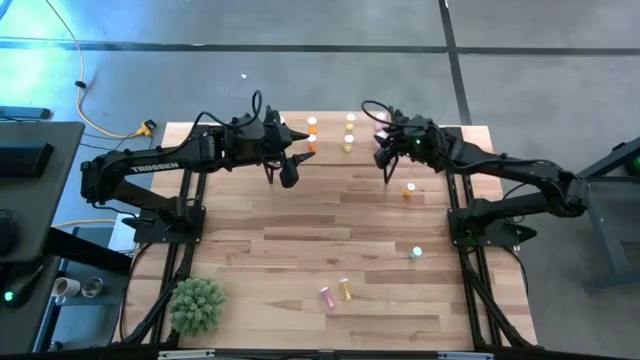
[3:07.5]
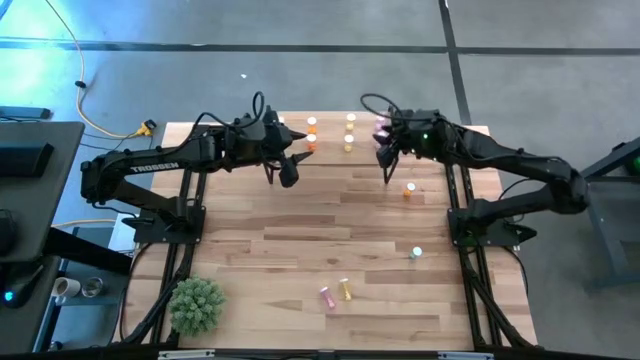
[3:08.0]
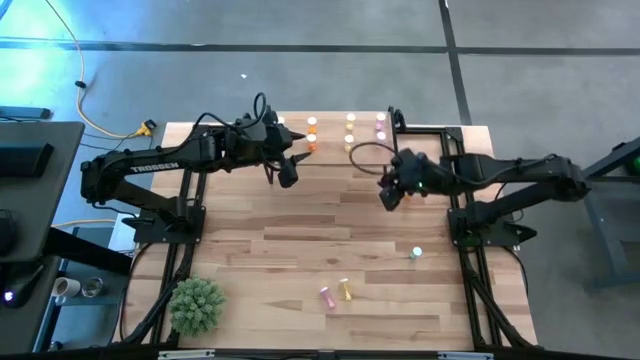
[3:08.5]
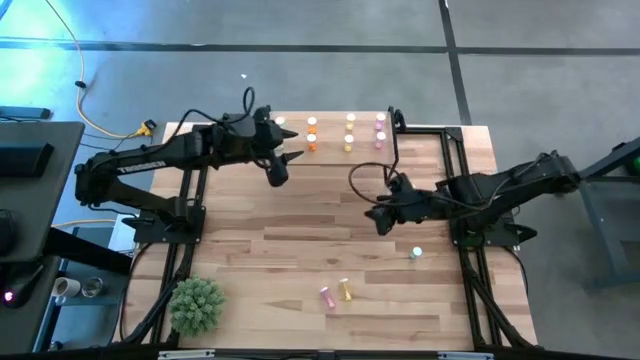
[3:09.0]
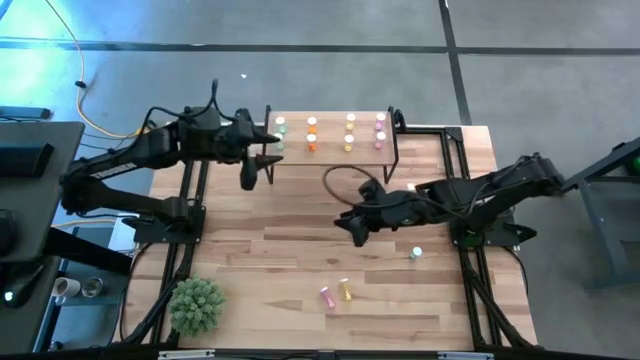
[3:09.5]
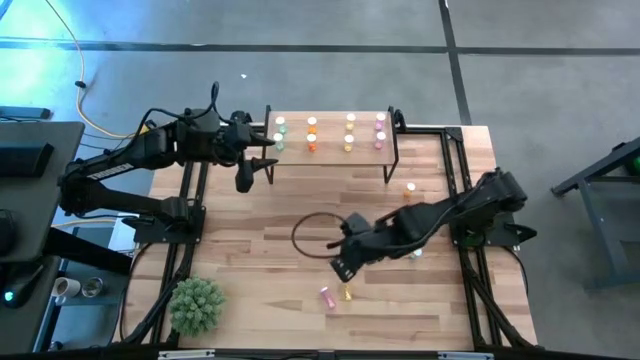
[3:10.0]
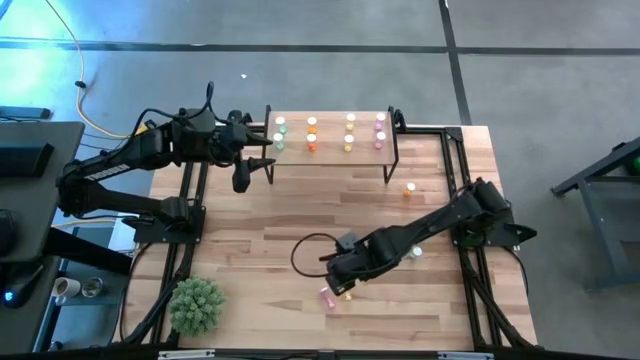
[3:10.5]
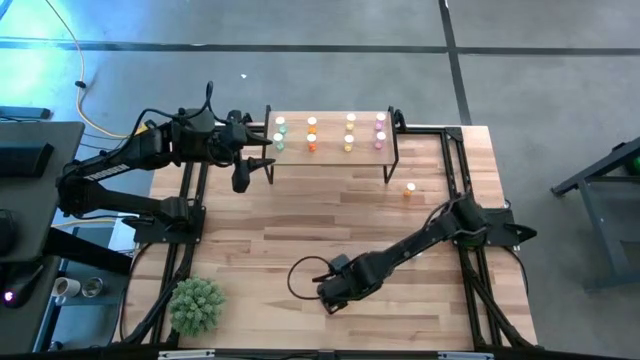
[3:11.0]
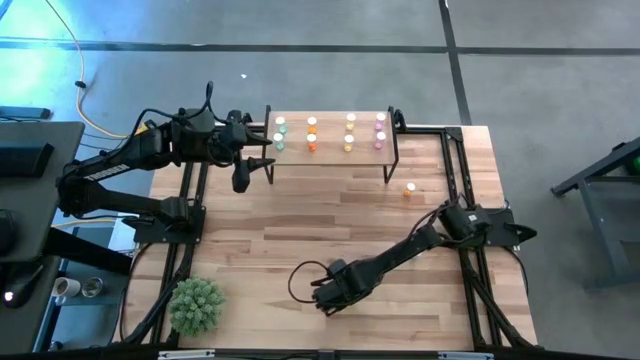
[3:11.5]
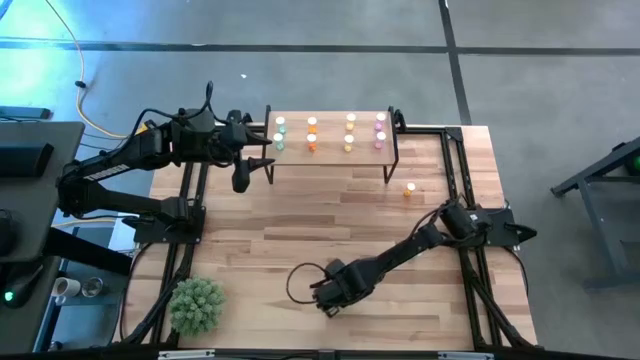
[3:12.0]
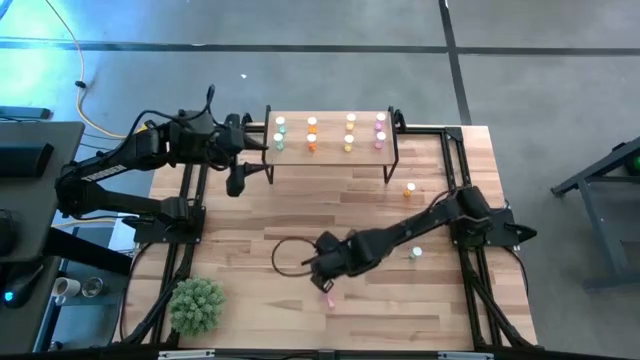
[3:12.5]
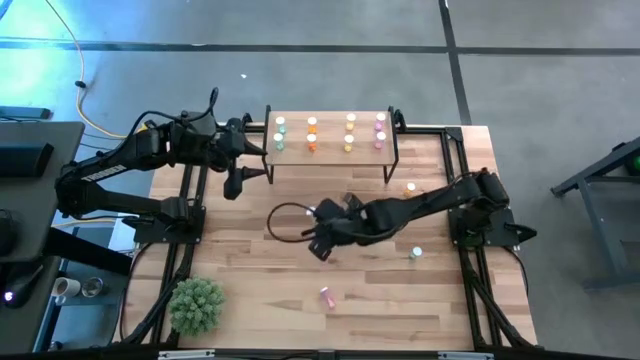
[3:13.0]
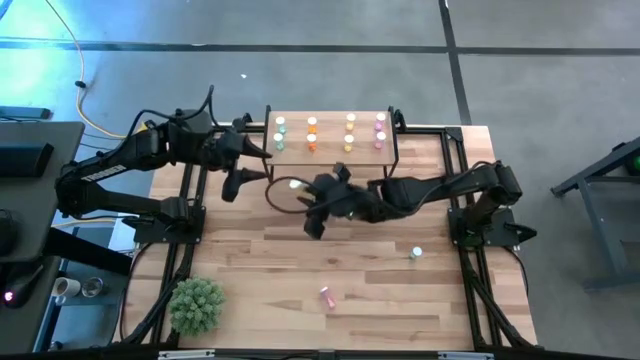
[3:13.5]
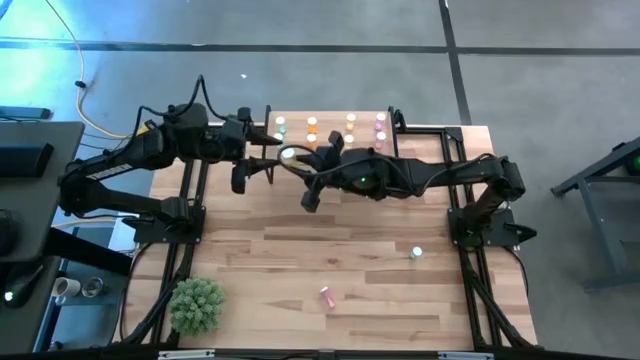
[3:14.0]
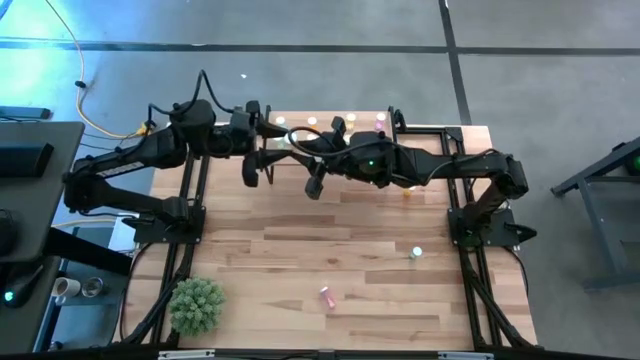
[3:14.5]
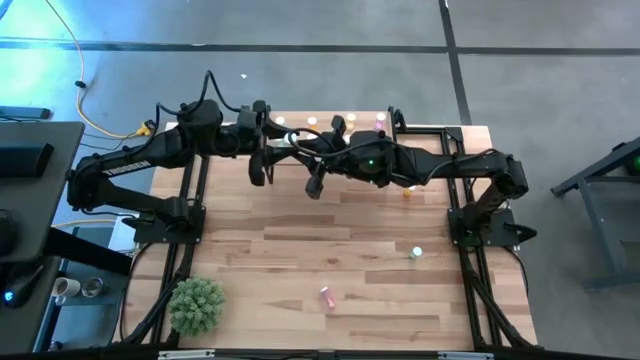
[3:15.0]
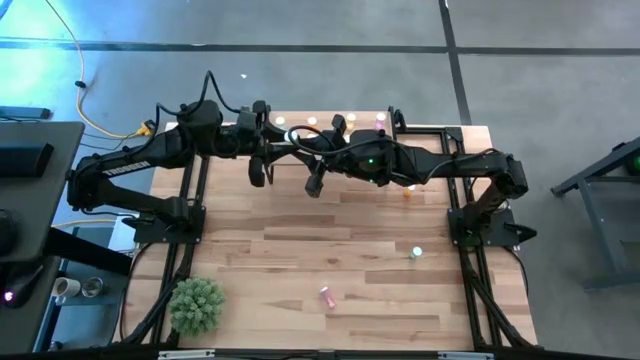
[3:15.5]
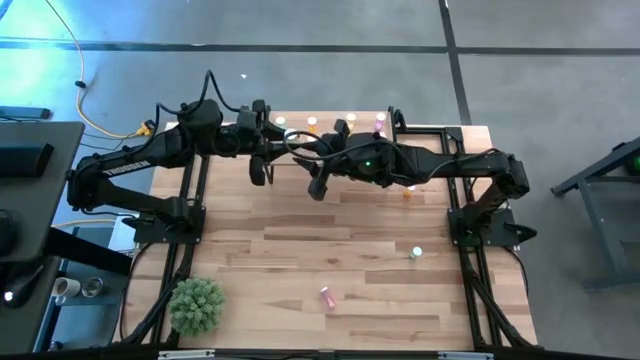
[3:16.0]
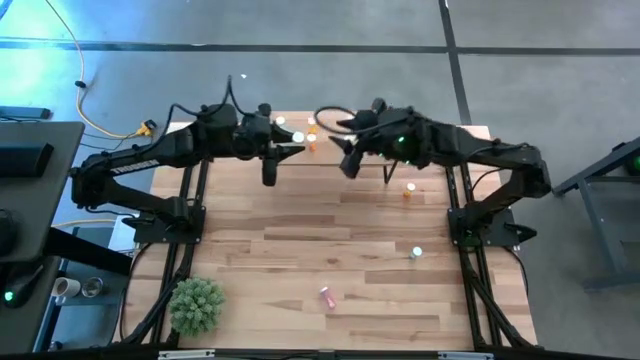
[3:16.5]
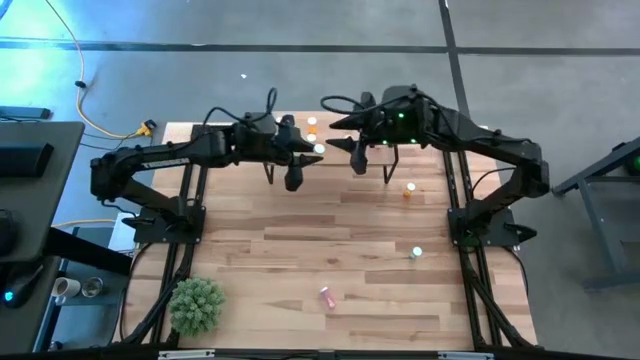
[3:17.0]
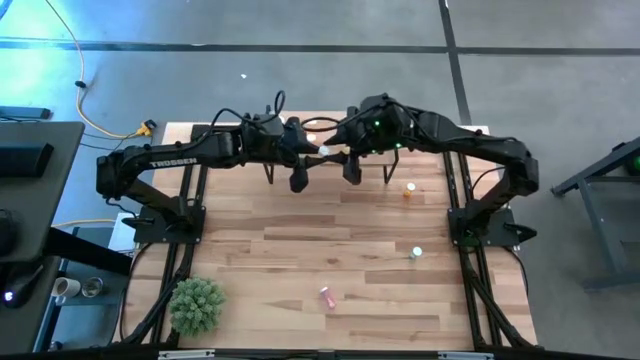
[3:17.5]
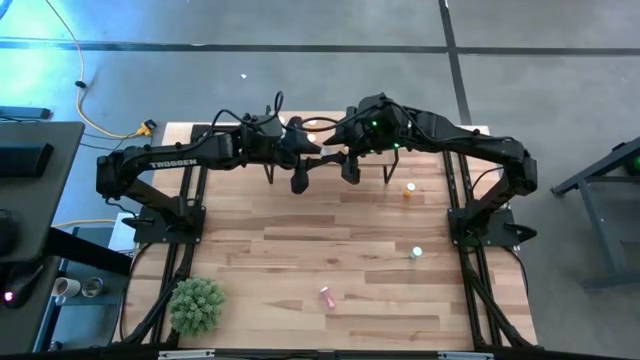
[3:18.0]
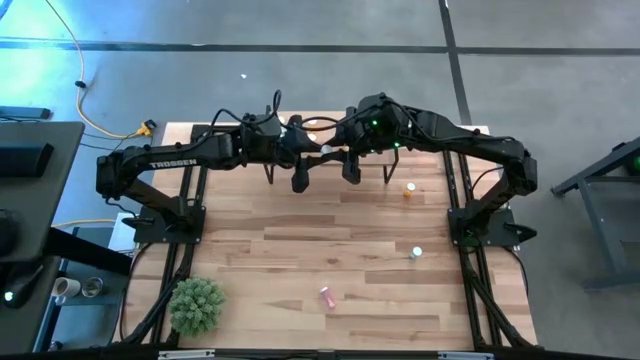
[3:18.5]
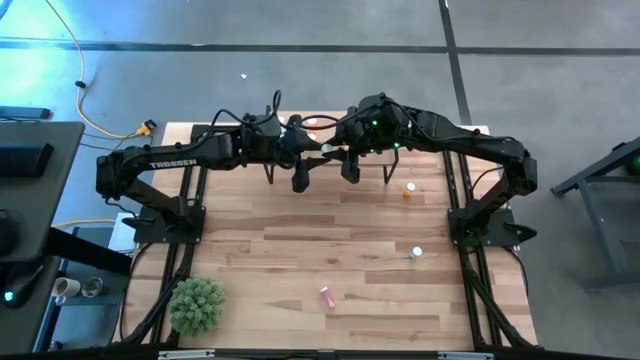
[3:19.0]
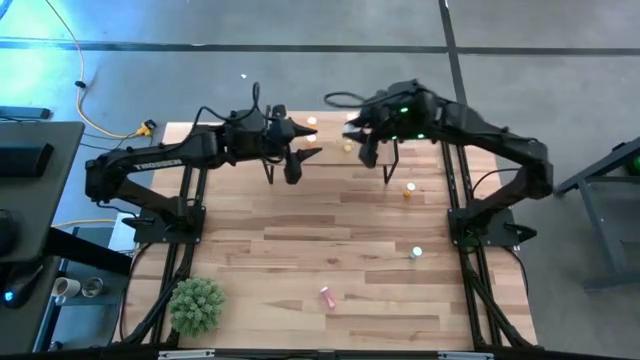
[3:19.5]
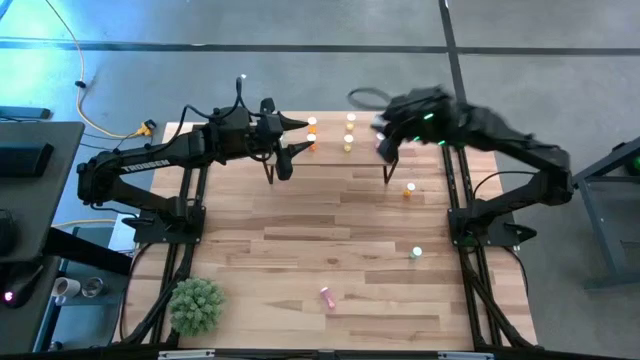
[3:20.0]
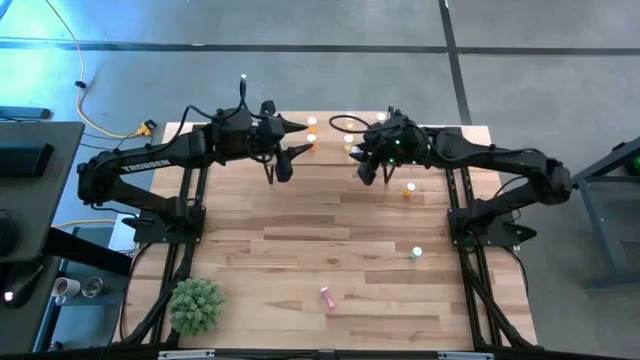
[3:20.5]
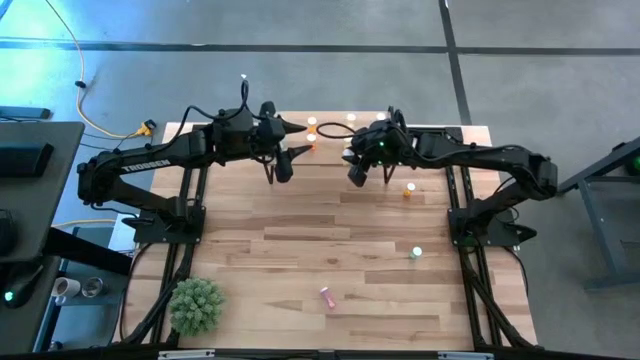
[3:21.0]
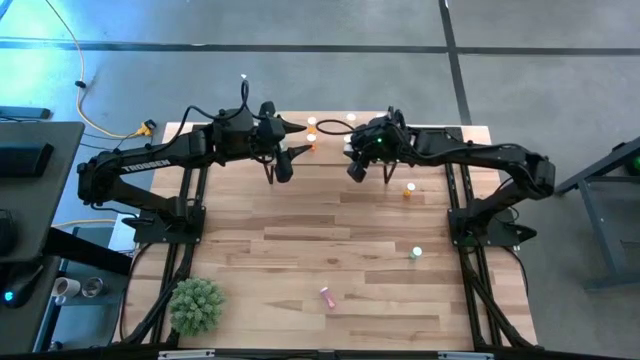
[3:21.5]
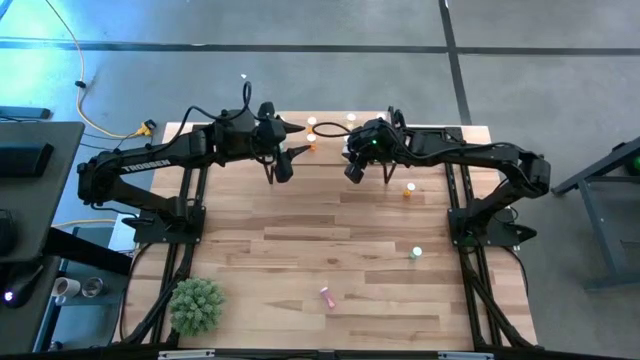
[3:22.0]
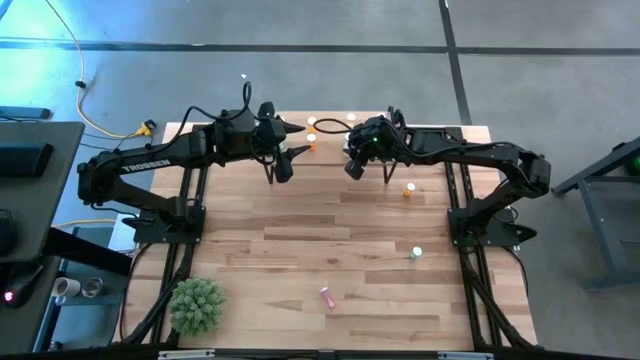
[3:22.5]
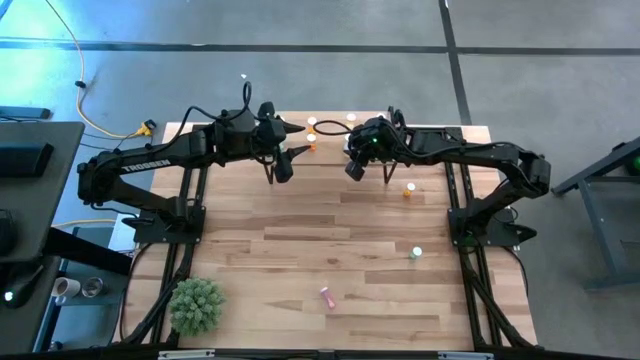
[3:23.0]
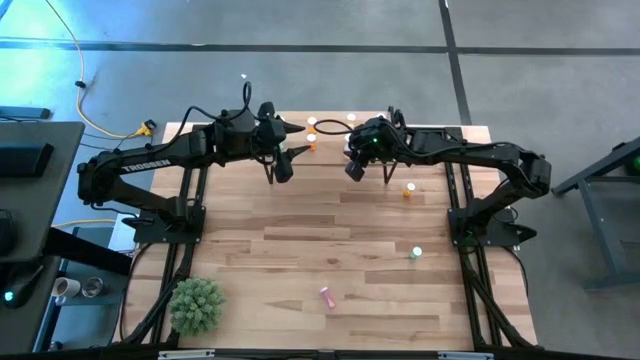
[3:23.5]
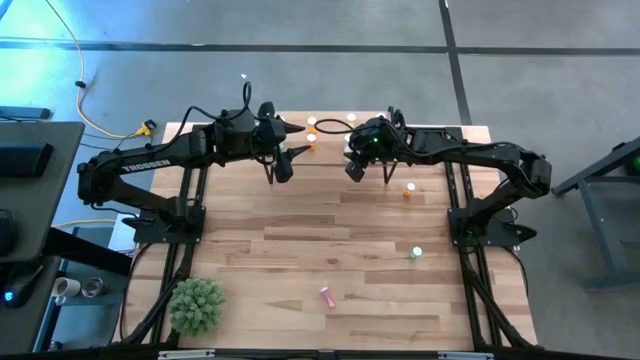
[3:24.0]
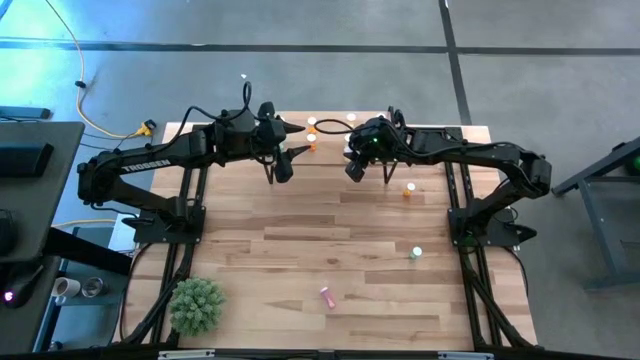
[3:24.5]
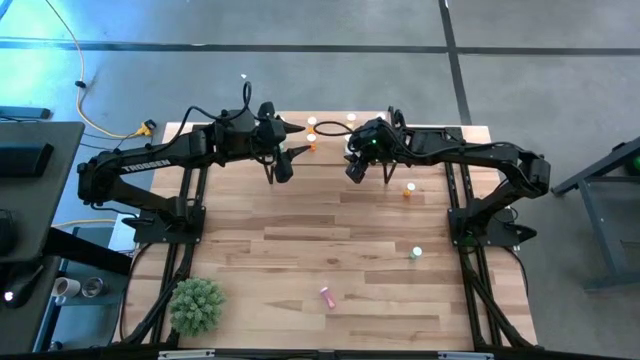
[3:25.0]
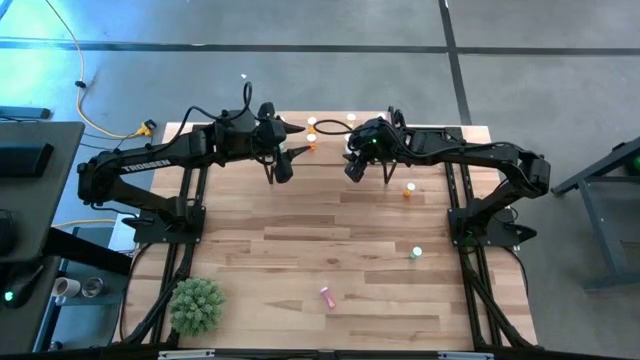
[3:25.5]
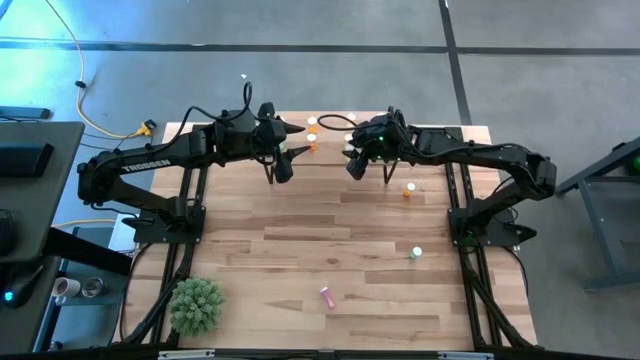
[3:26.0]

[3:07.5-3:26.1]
Task: Pick and place medicine bottles onto shelf by color
Put the yellow pill bottle on the shelf aligned with the other yellow pill bottles
